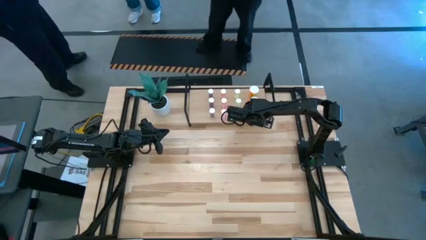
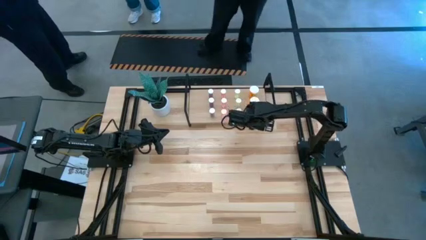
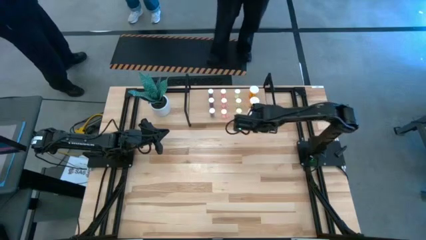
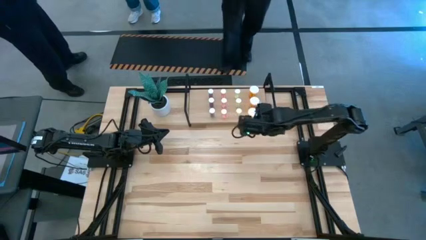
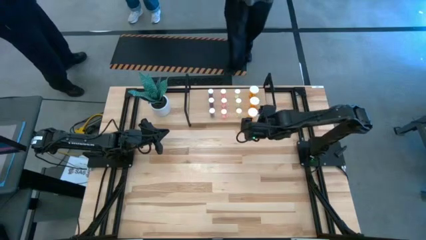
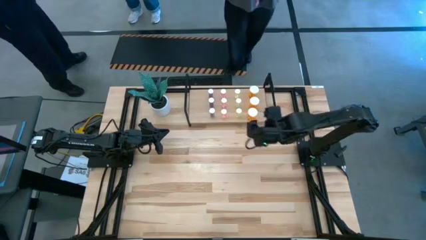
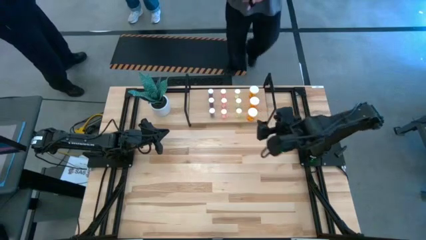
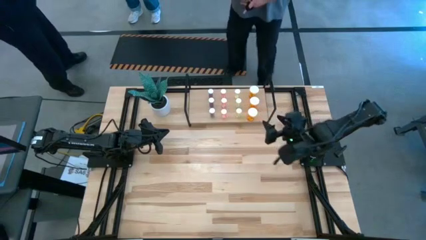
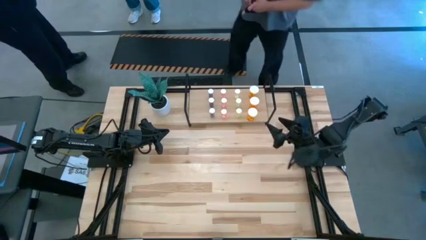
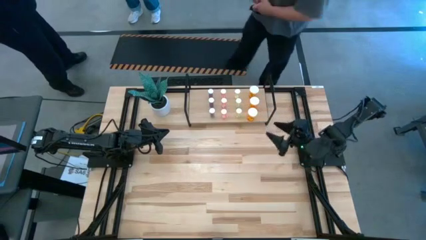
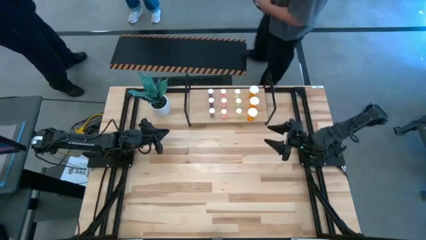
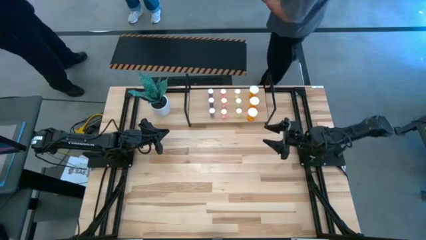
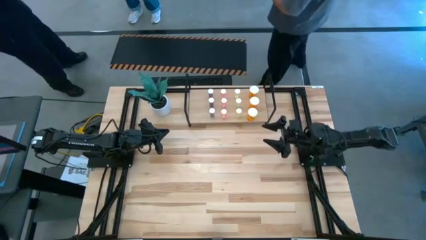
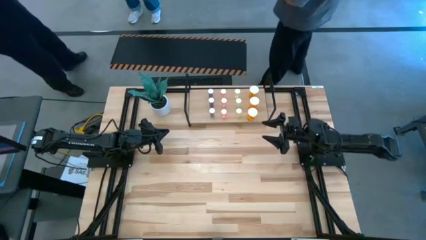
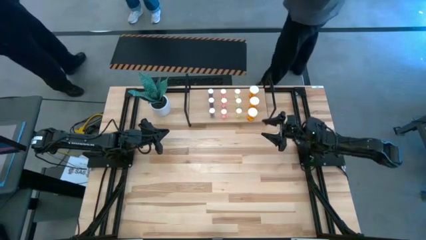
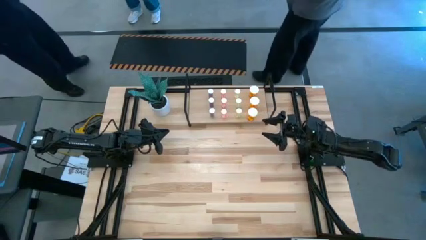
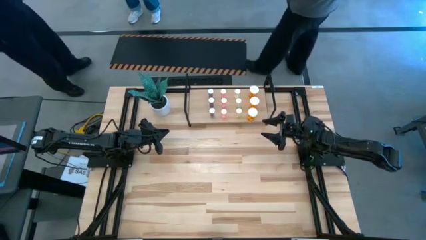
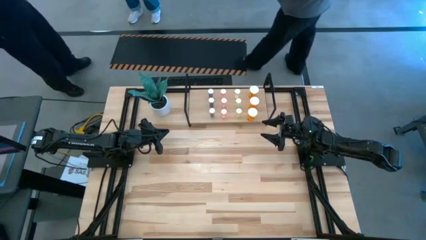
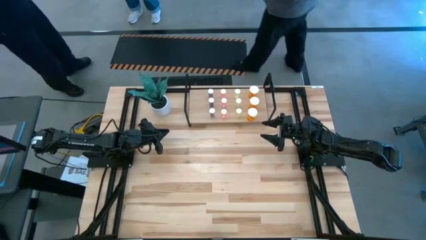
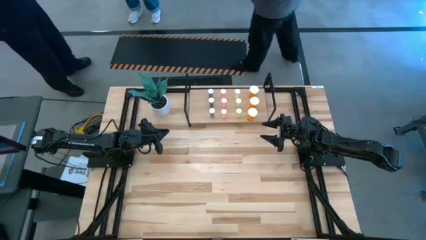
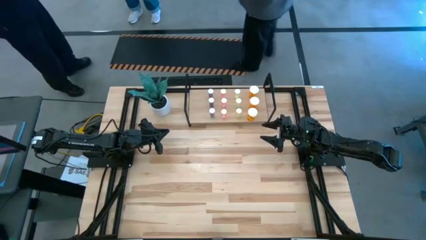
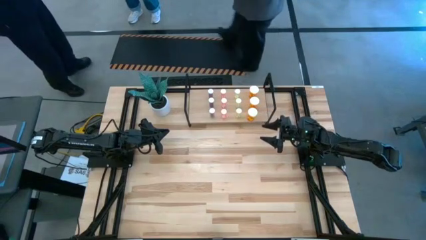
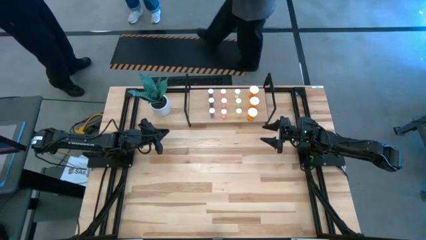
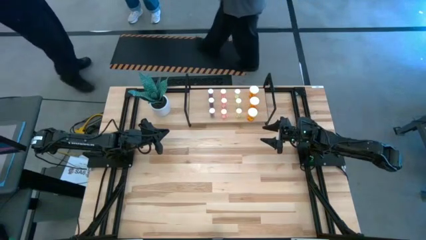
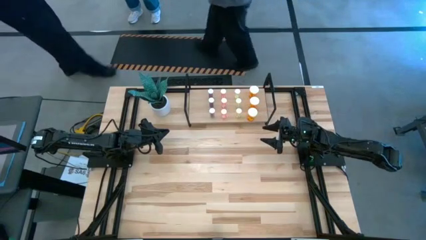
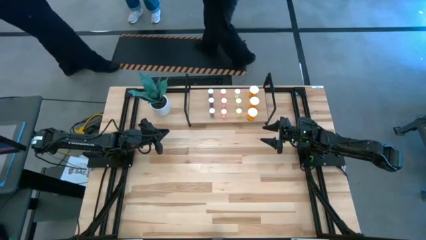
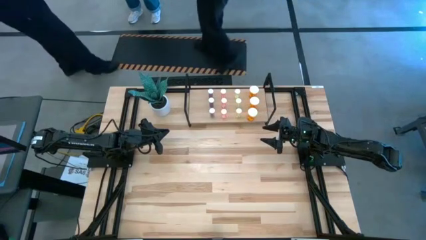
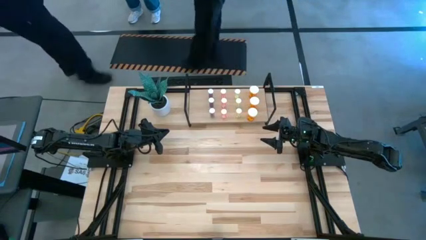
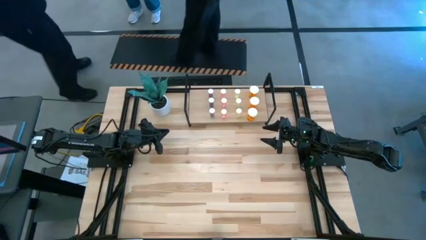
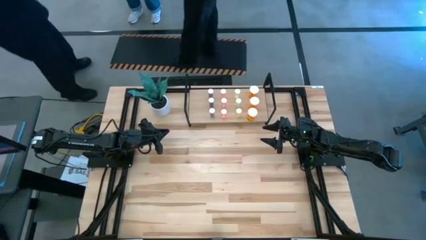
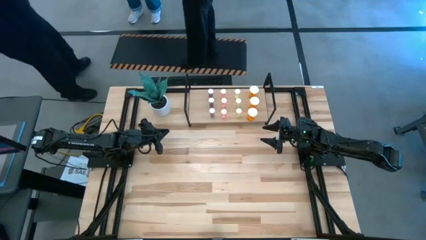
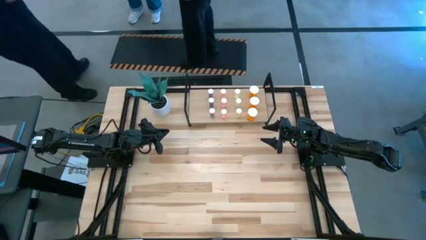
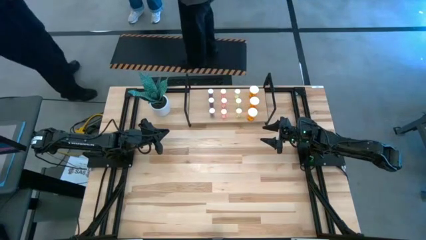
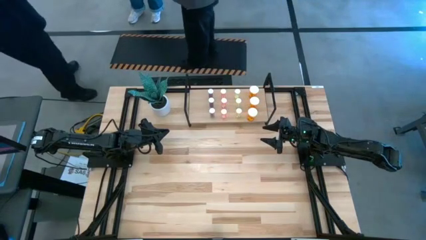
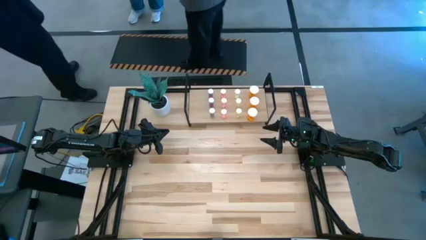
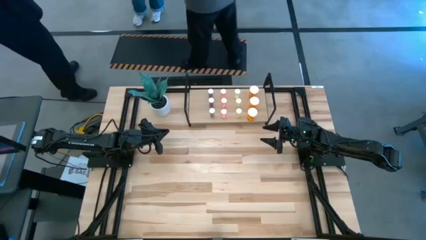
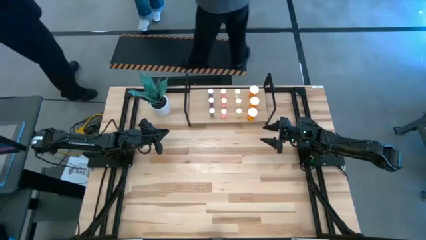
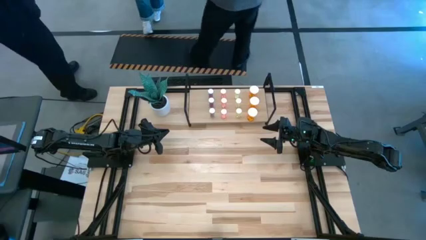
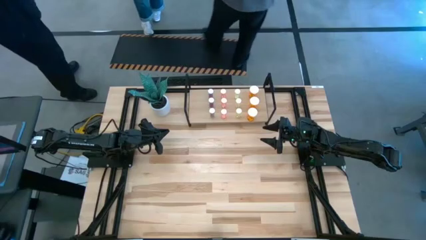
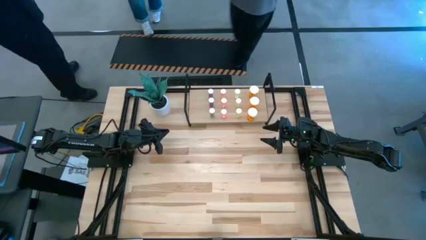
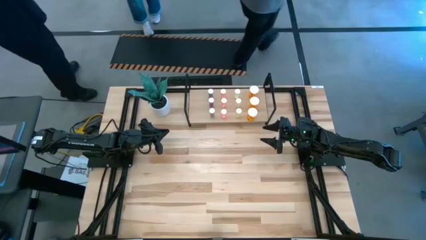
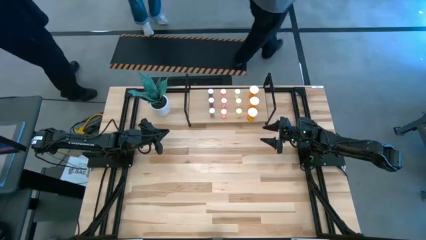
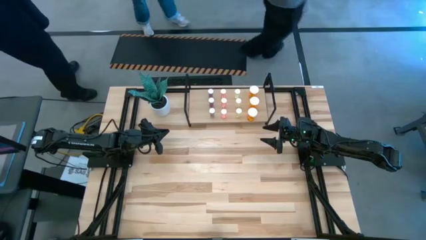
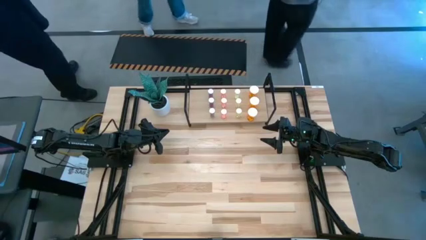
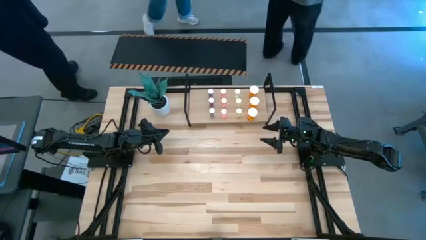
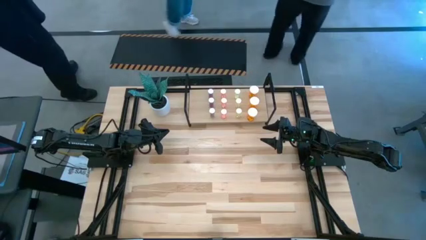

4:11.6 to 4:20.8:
Task: Pick and place medicine bottles onto shelf by color
Return to Home Position

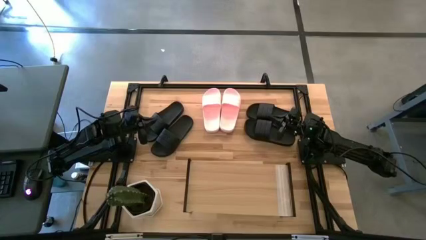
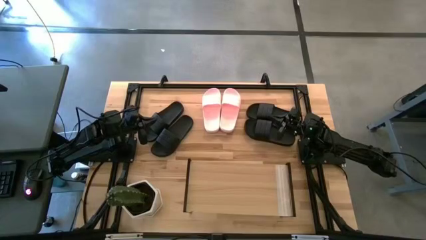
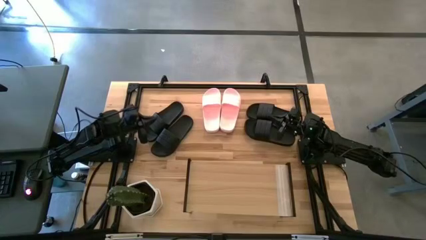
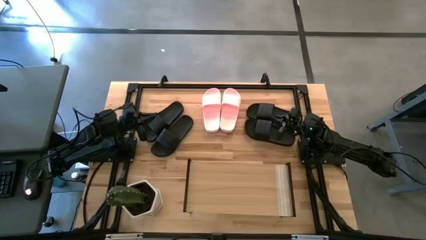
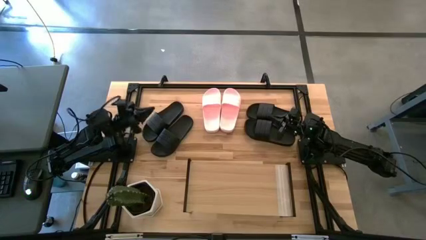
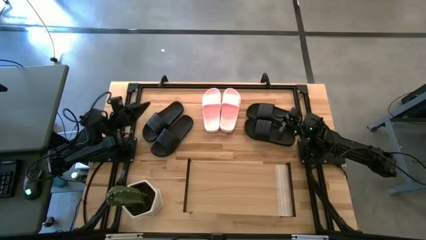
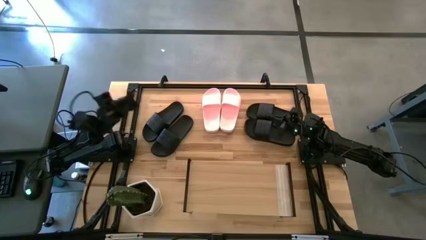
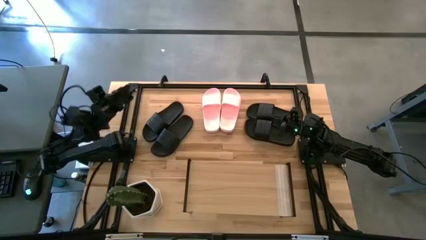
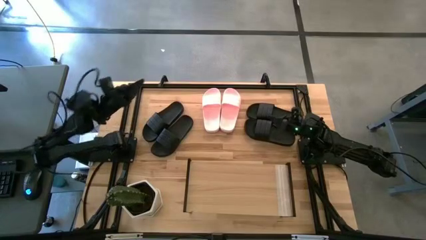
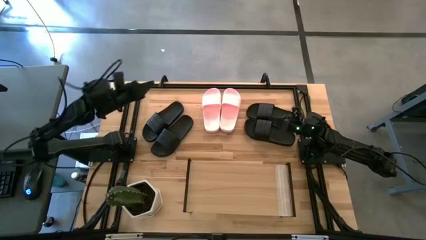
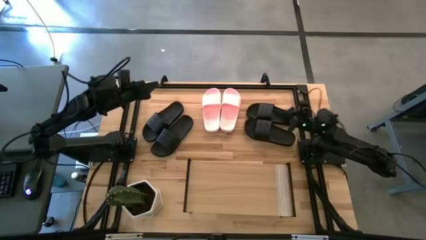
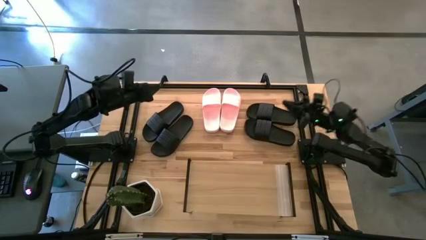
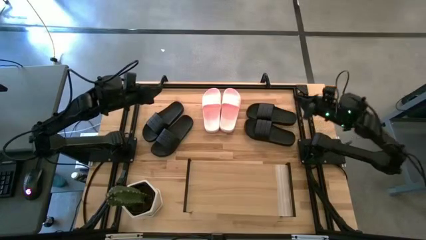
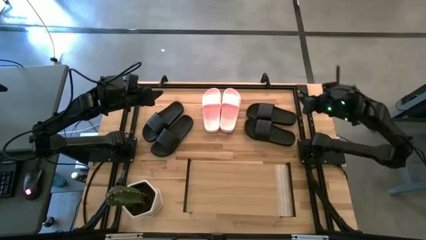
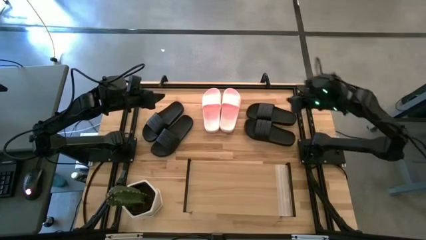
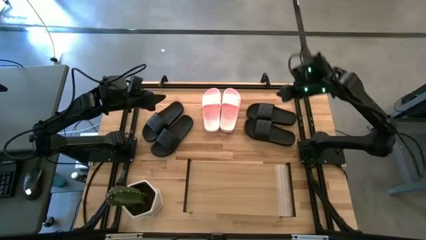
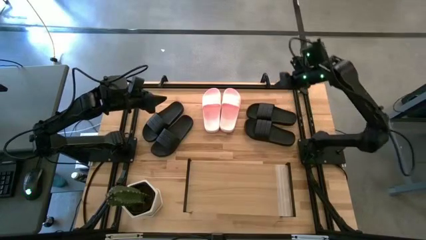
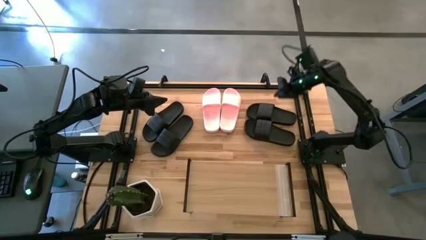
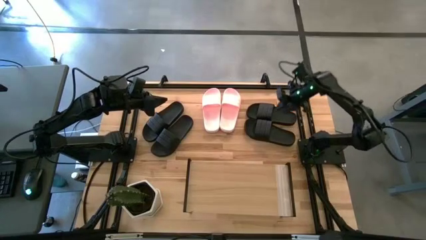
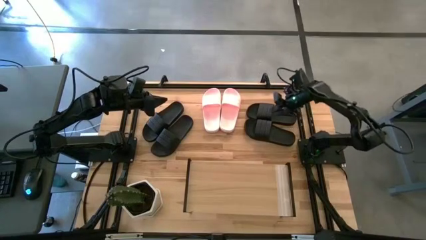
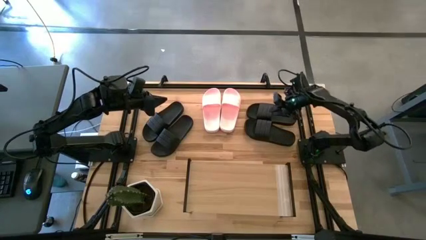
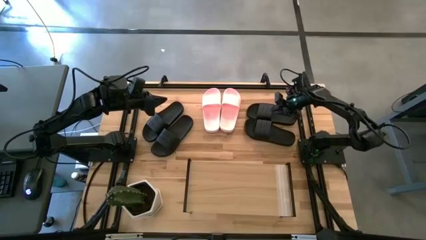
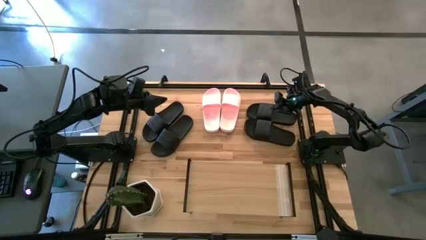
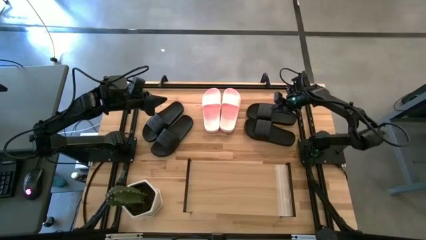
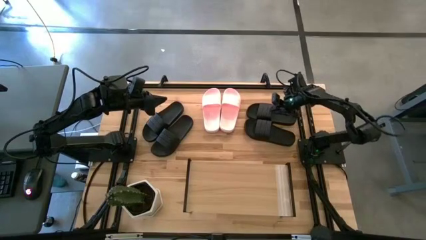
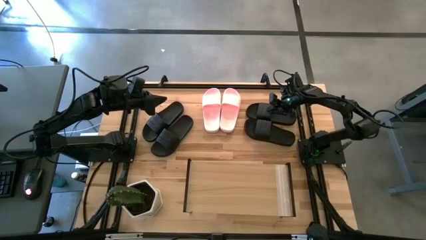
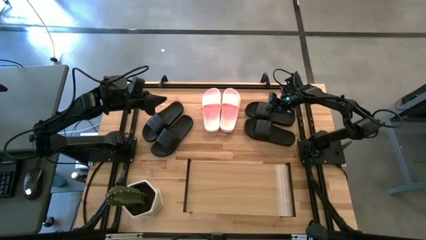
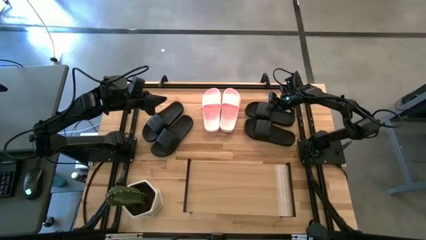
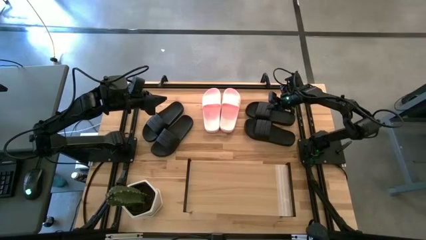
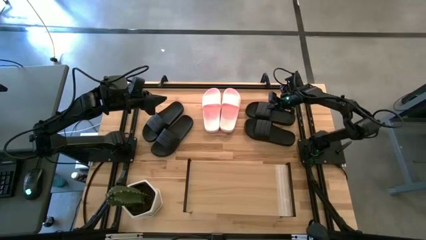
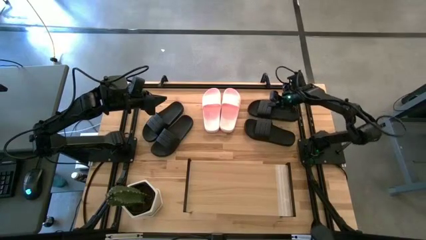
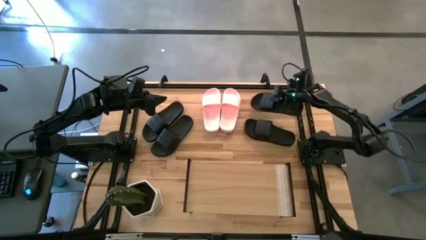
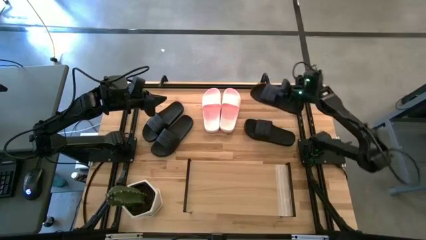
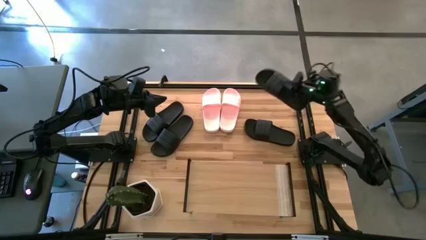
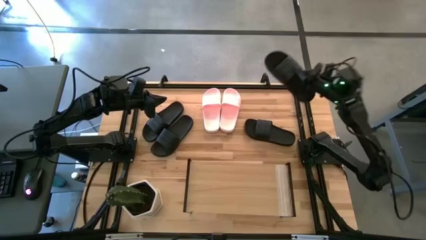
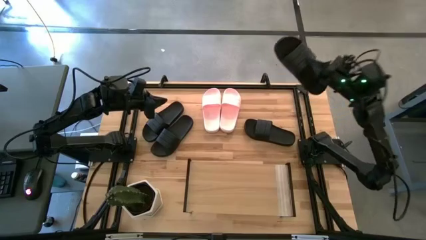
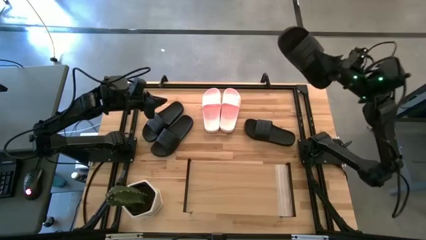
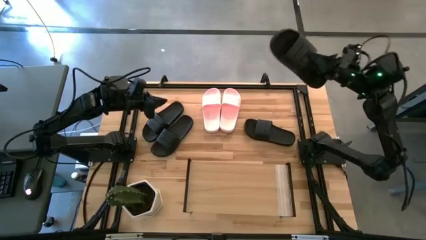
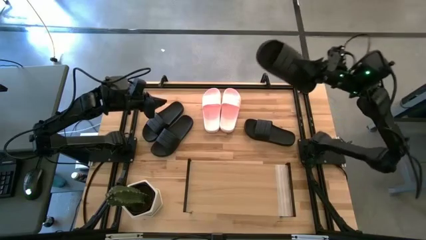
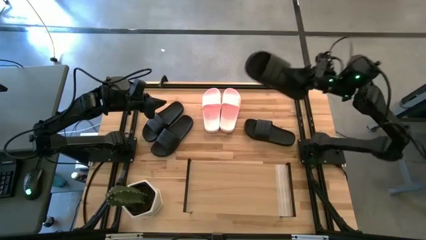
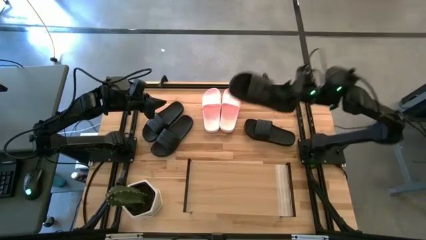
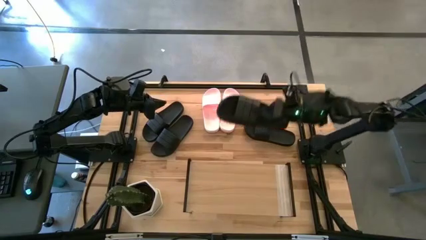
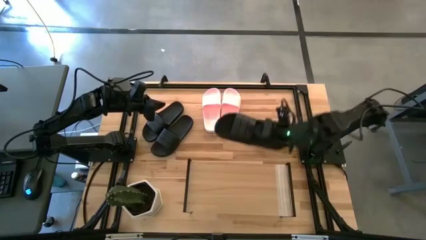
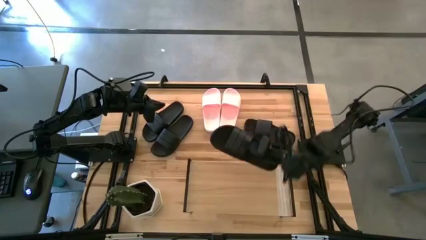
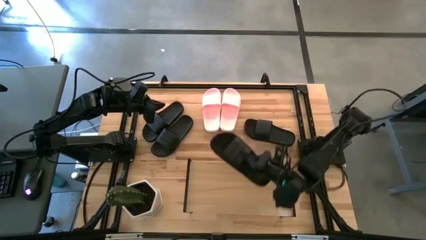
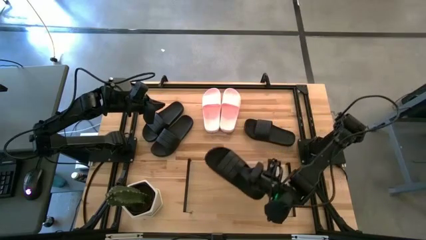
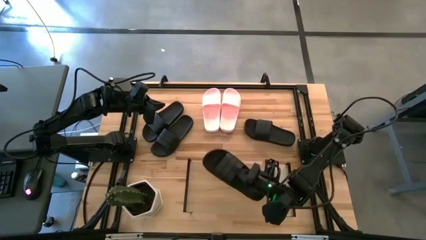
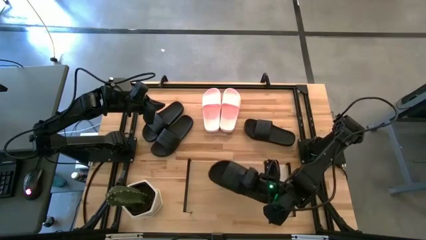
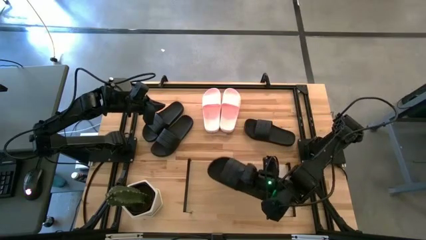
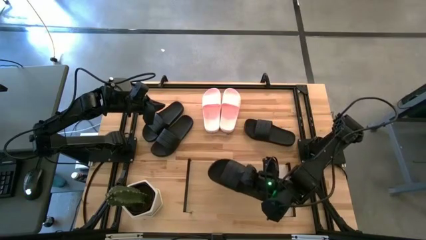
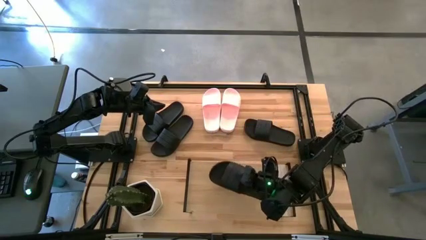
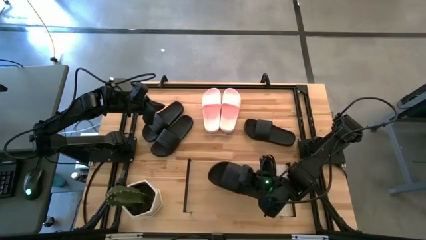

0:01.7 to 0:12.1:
Task: Pick and place slides into the shelf
Put the black slipper on the shelf
